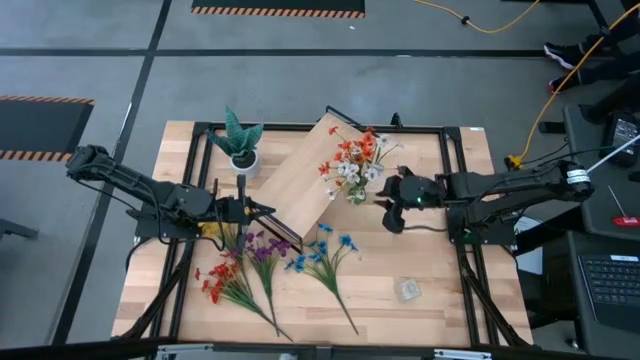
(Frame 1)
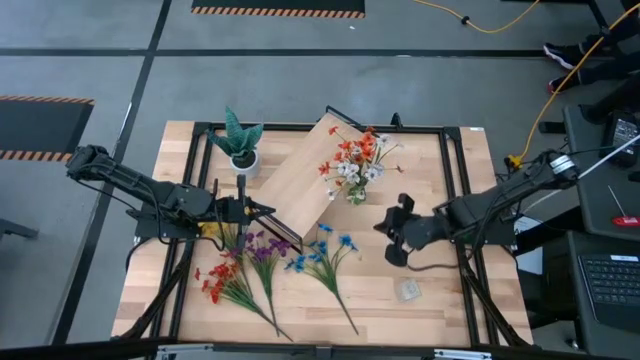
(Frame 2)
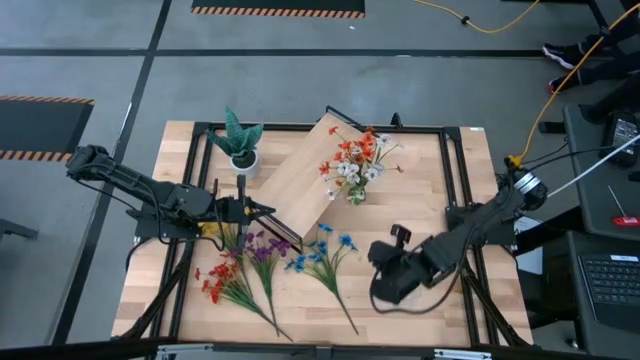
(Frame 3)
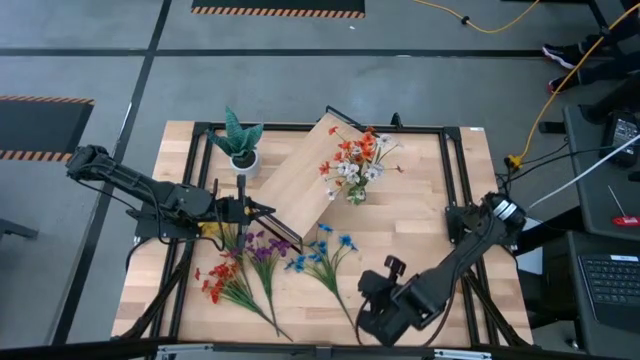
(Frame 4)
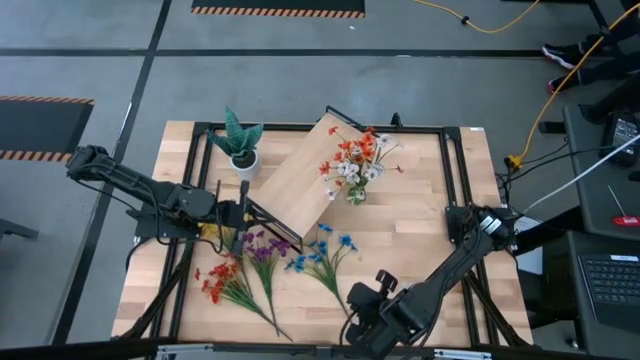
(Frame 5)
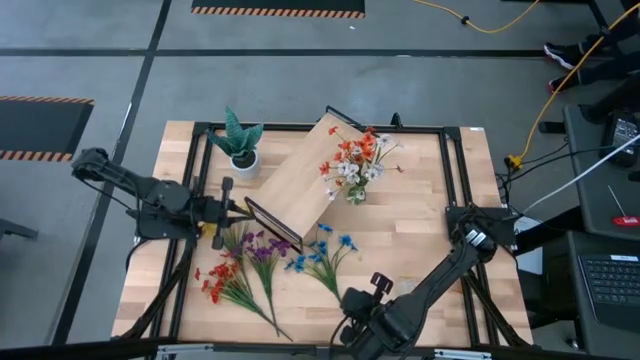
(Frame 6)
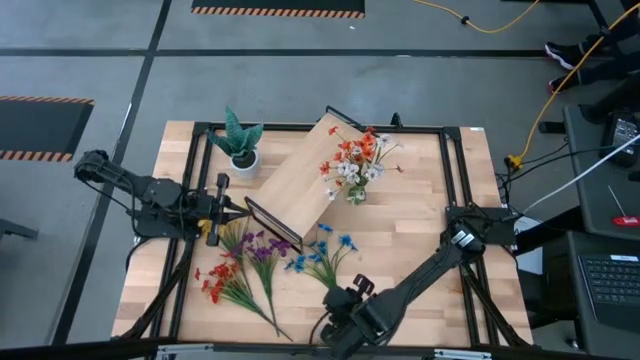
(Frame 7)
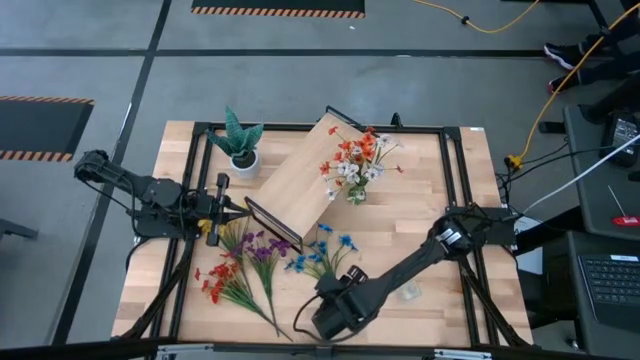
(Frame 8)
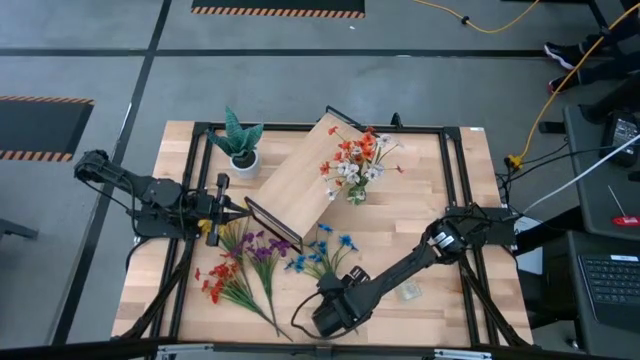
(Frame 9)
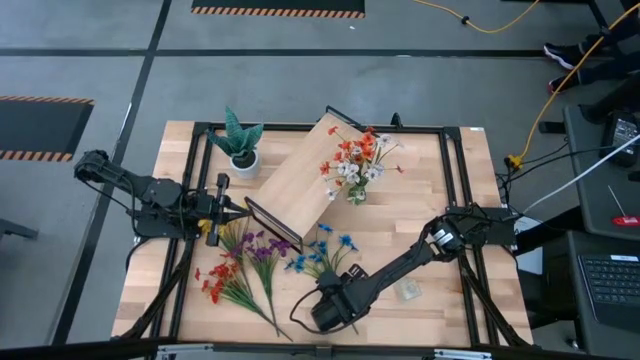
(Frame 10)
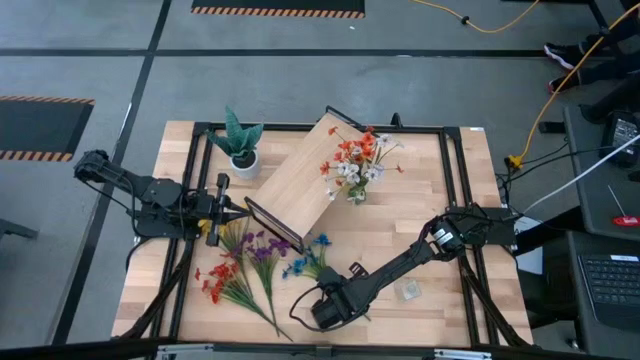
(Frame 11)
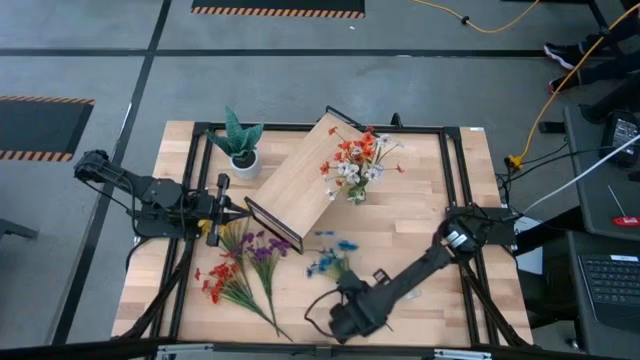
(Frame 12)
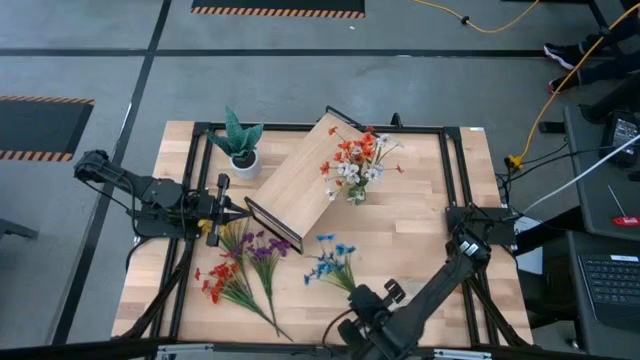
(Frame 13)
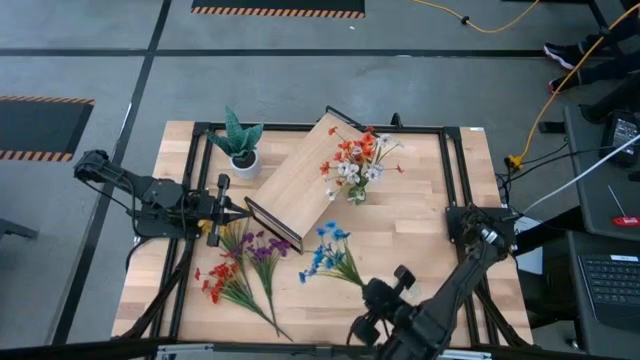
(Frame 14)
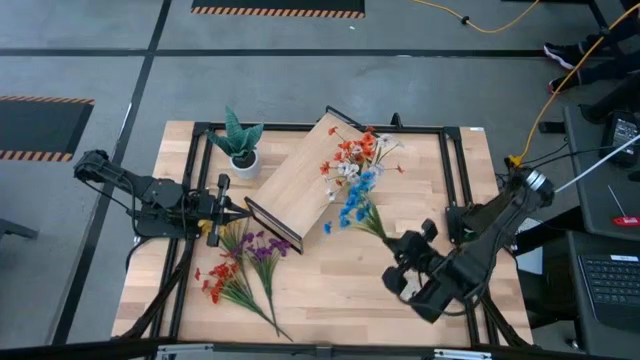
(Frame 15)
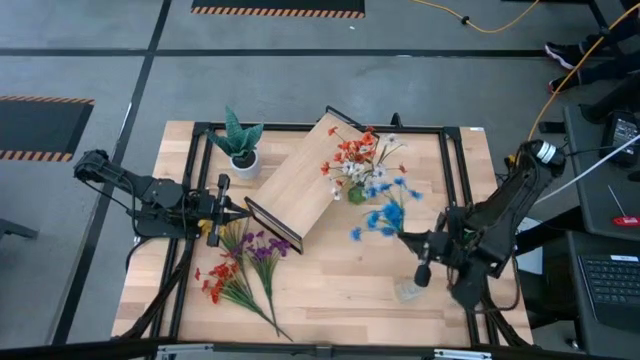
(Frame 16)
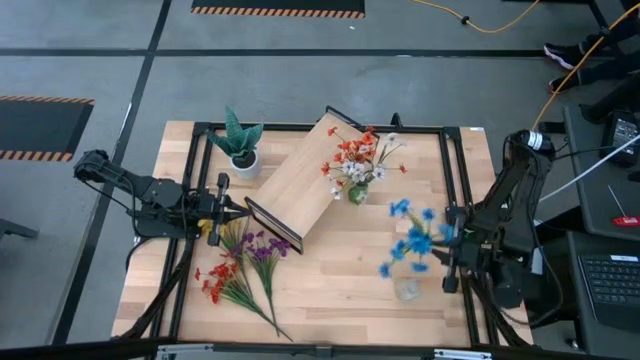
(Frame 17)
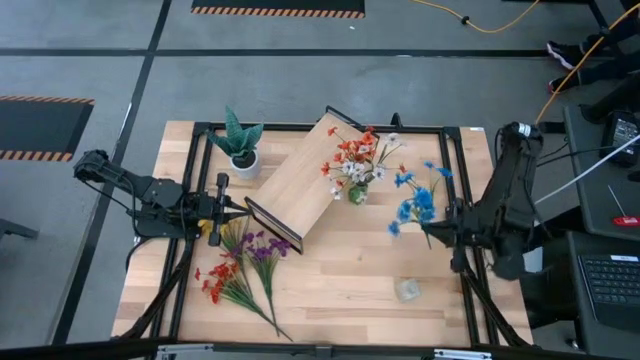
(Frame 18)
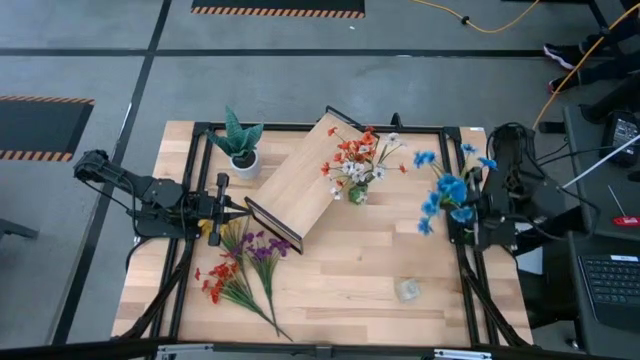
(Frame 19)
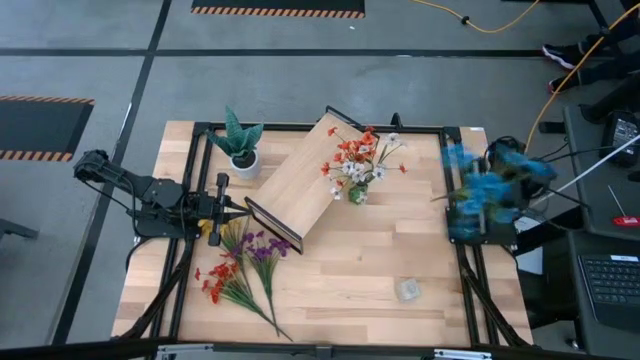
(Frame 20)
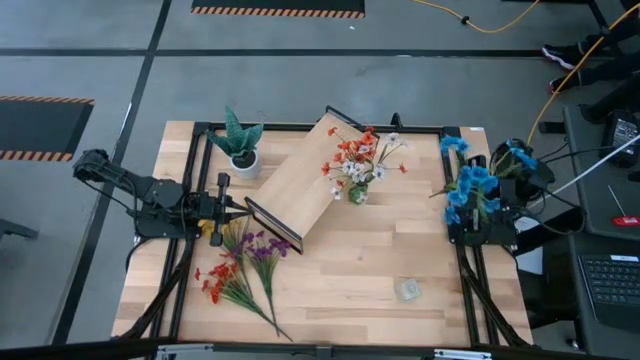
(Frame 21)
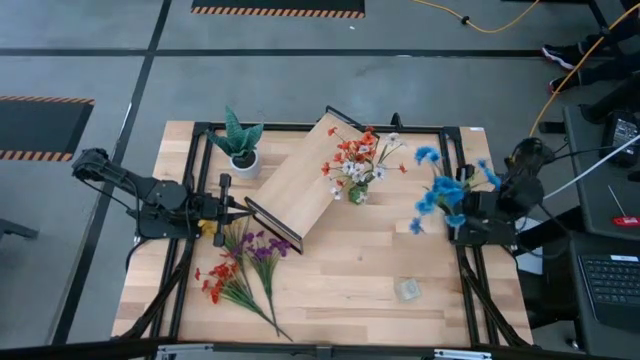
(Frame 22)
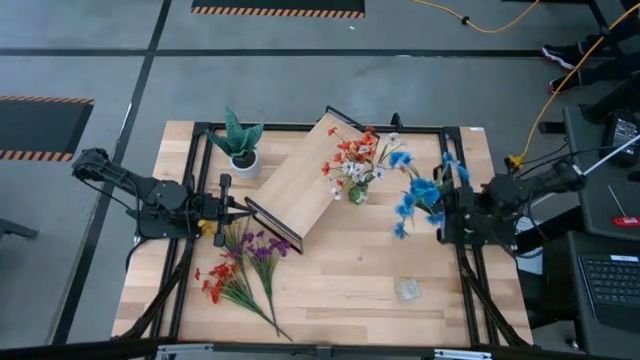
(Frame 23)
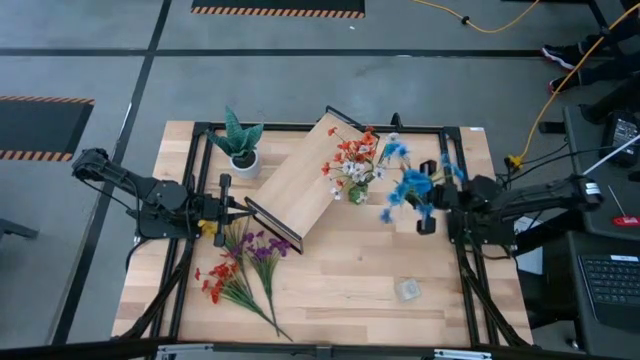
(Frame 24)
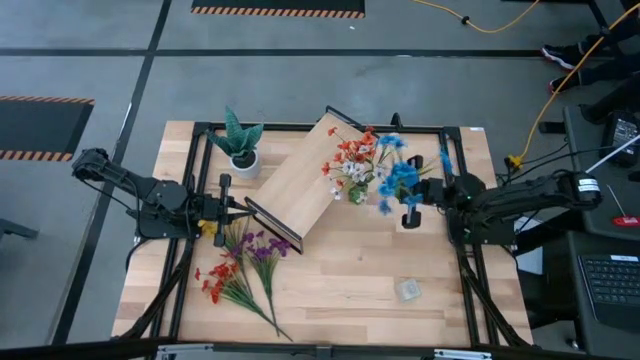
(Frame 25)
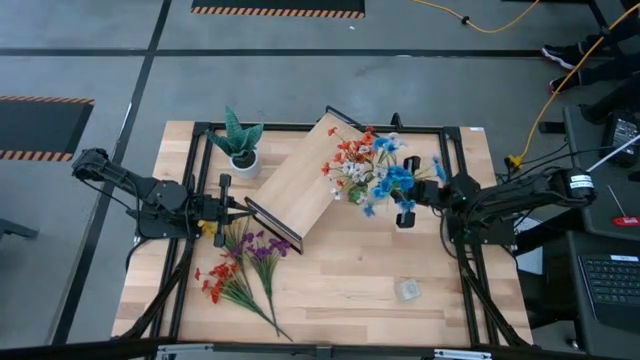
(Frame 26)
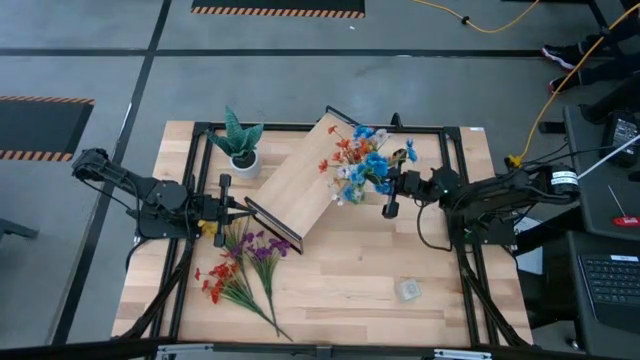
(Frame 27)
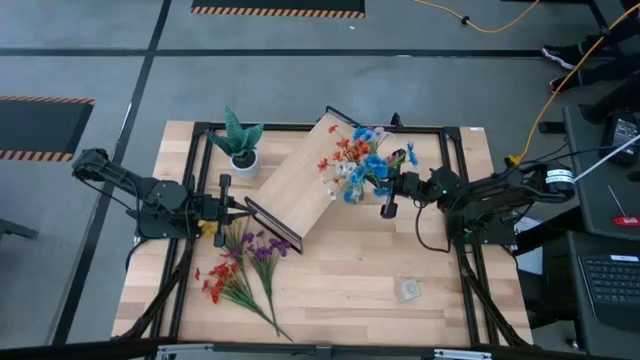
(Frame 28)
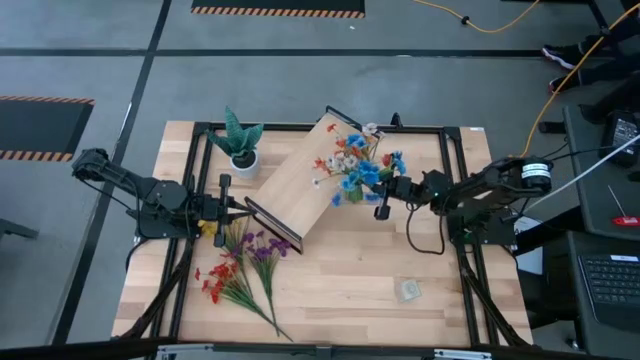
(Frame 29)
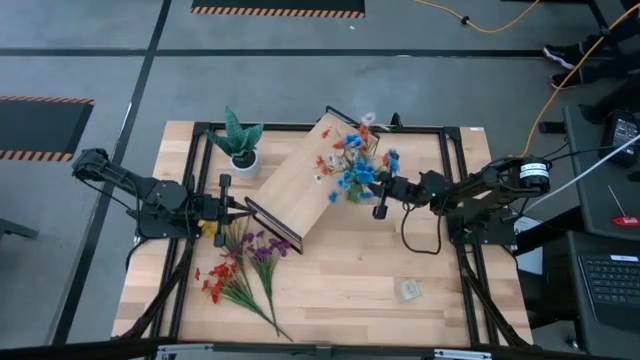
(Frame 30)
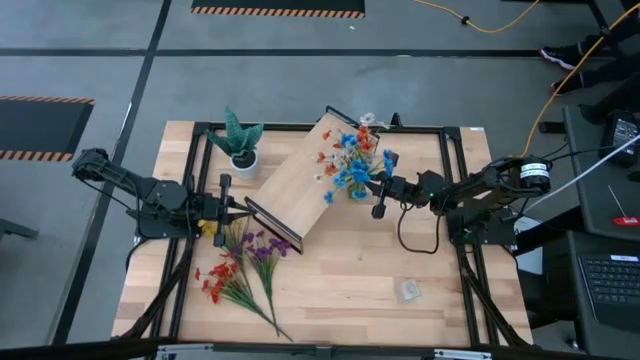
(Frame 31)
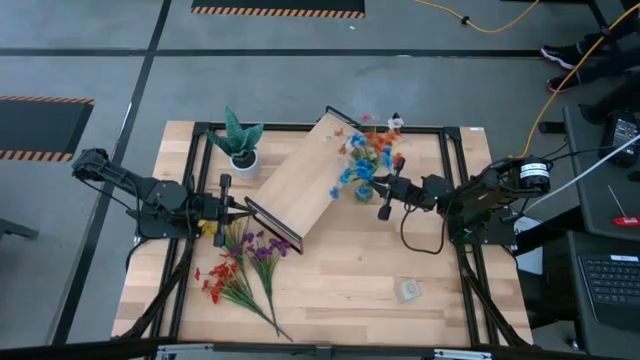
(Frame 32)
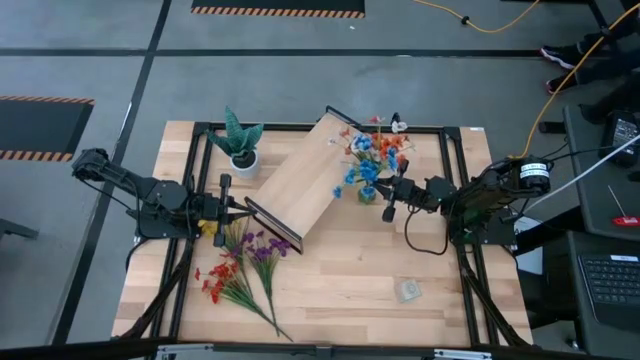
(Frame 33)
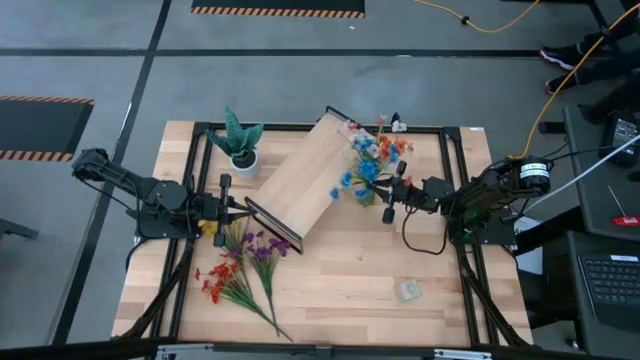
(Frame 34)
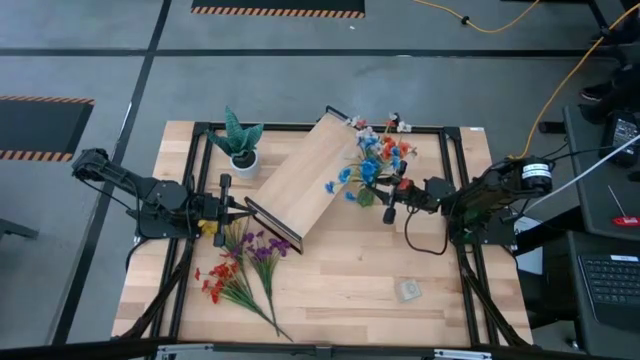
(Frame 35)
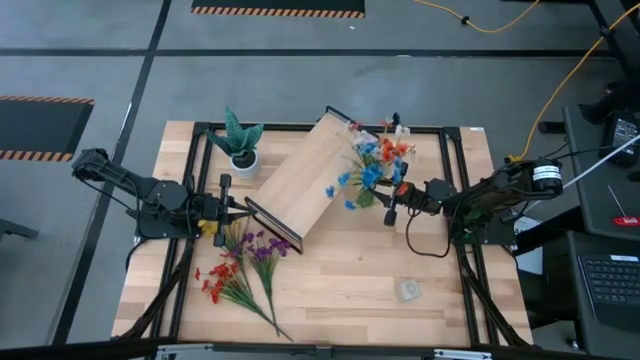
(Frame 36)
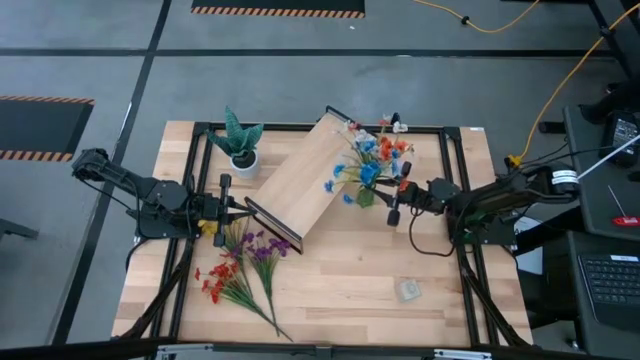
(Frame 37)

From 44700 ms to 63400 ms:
Task: Pick and place flowers into a vace then onto a shelf
Put the blue flowers into the green vase

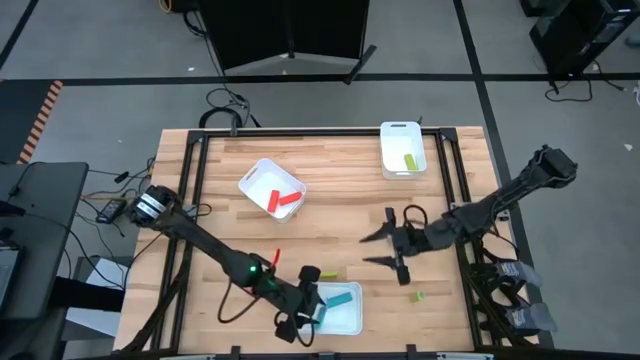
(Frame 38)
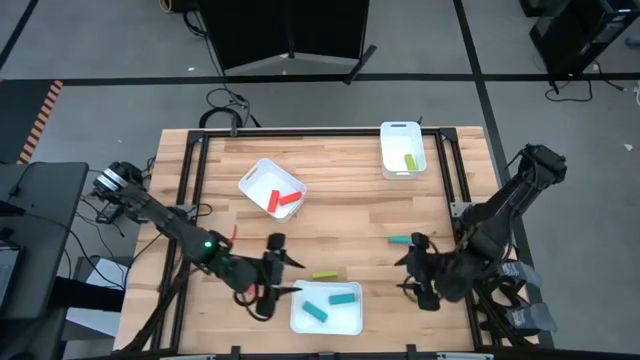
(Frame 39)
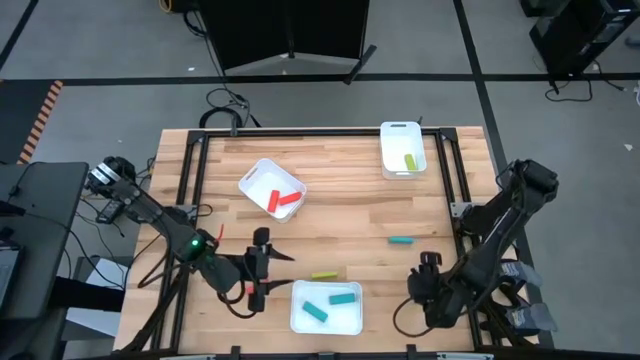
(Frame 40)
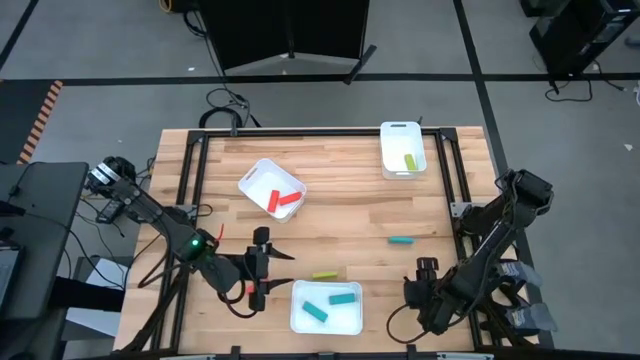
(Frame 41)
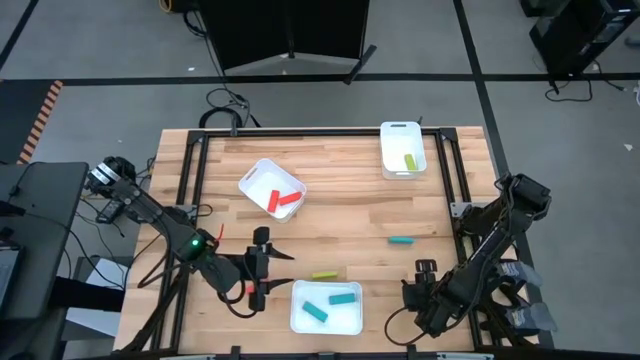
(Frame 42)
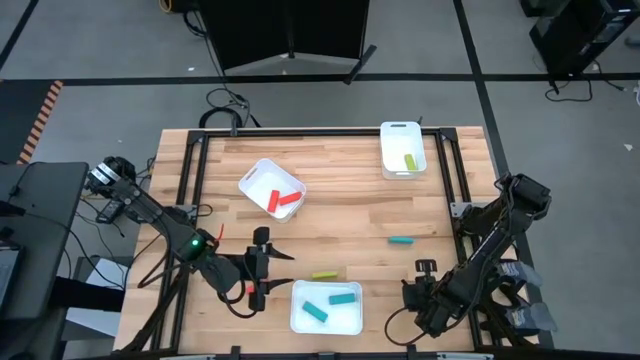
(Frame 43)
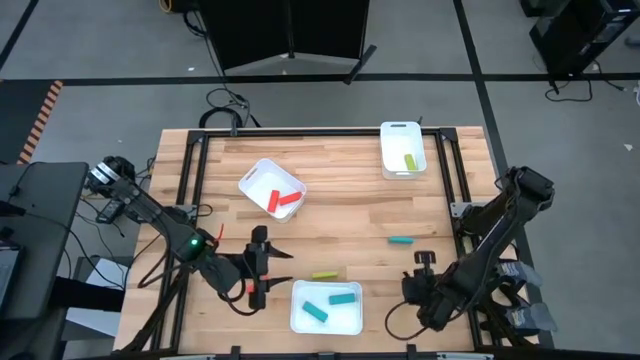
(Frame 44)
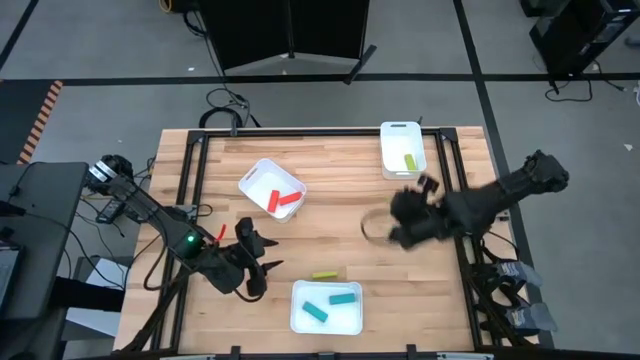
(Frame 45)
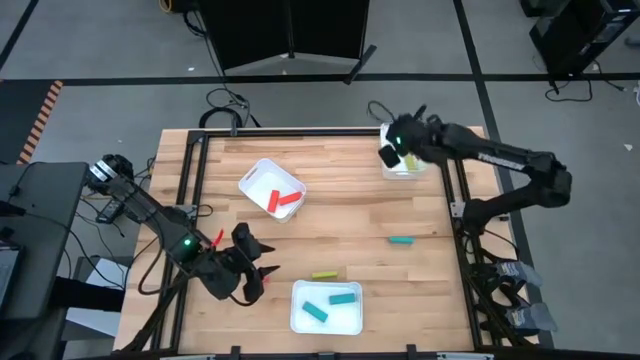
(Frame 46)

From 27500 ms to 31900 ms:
Task: Sort blocks
Put the right green block into the top right bin
